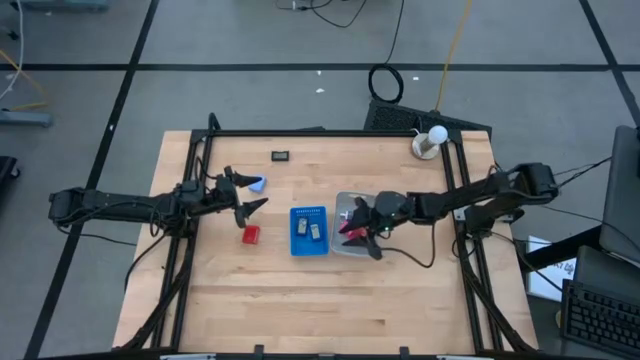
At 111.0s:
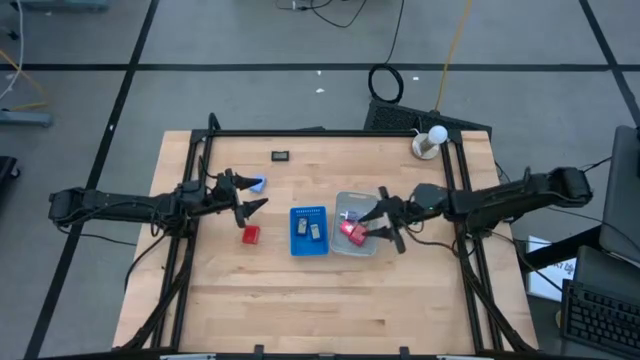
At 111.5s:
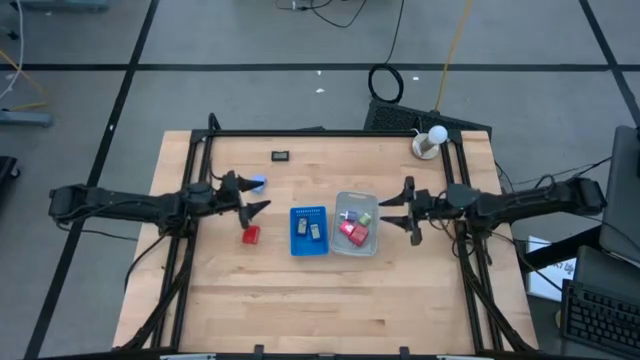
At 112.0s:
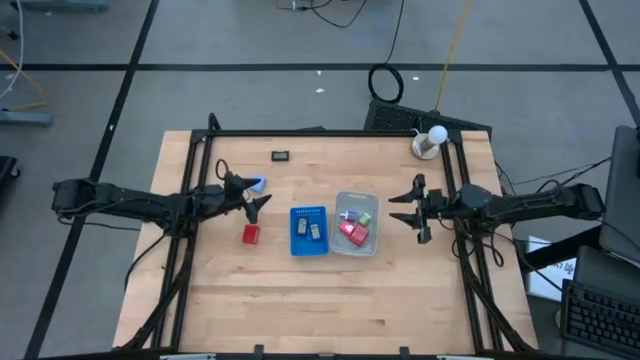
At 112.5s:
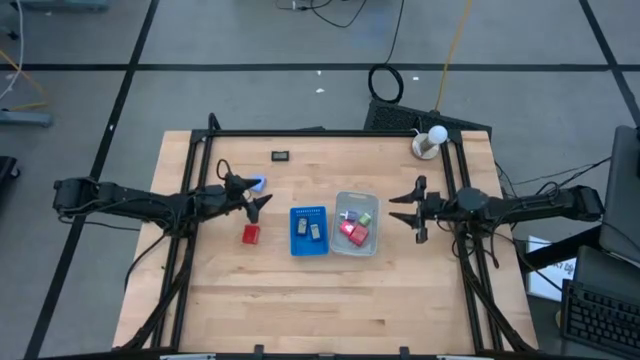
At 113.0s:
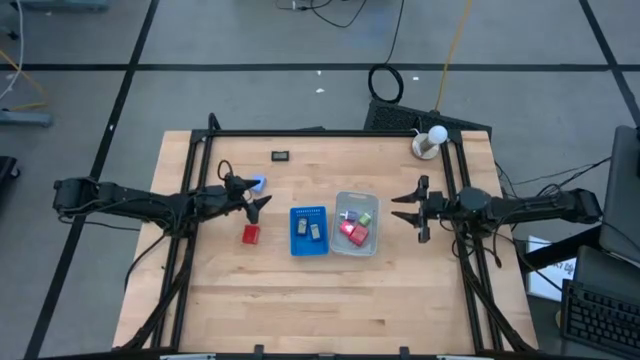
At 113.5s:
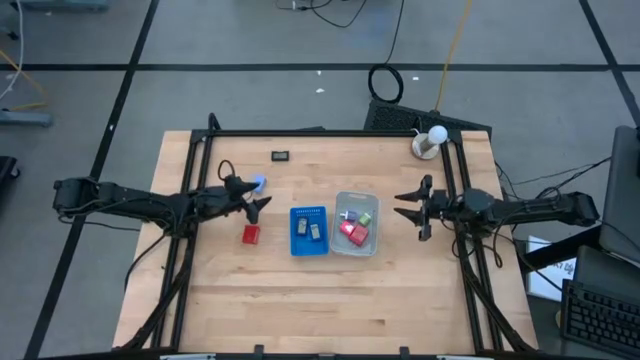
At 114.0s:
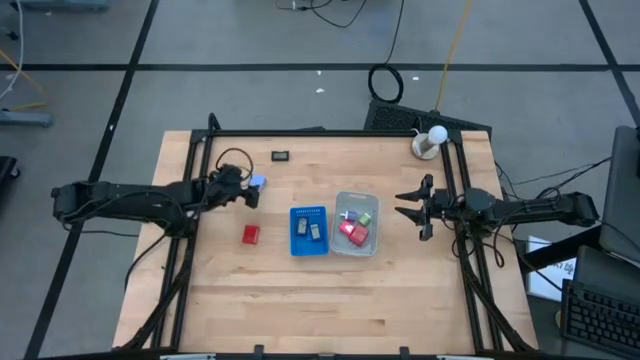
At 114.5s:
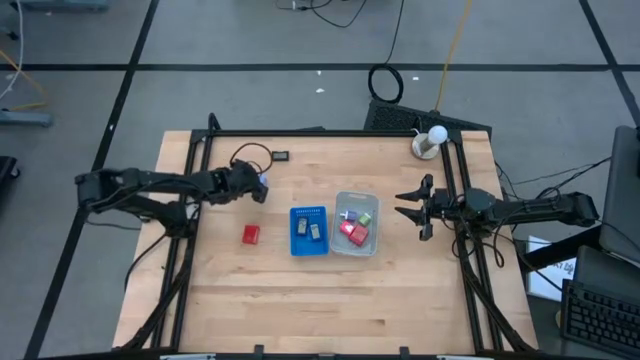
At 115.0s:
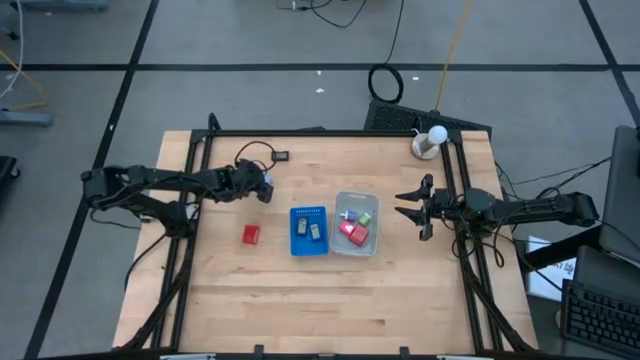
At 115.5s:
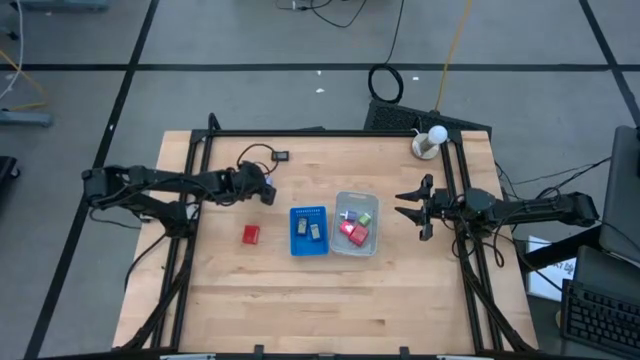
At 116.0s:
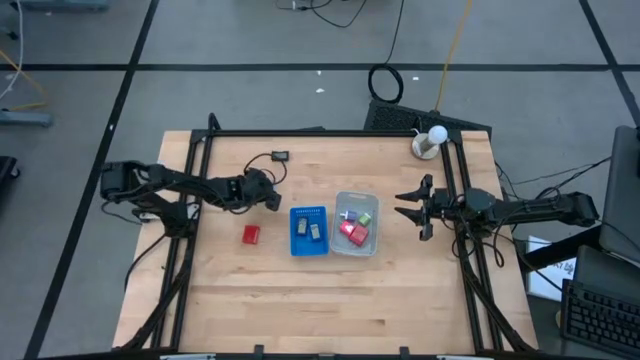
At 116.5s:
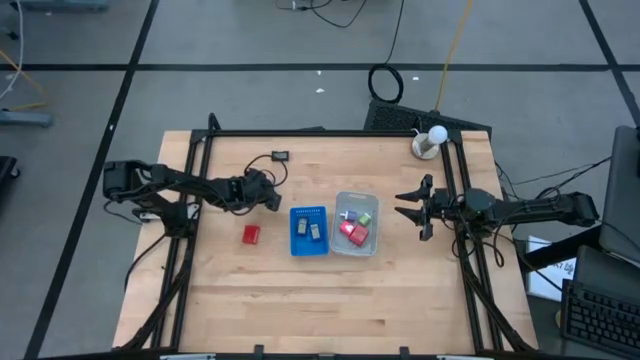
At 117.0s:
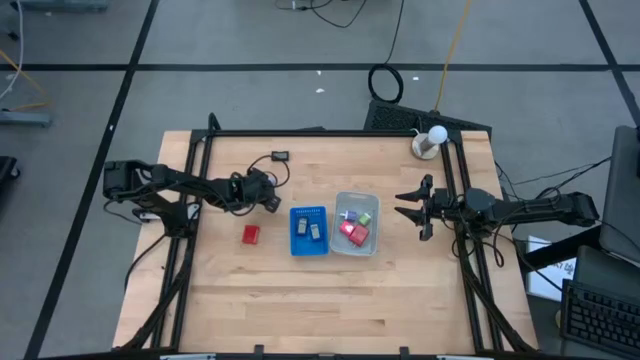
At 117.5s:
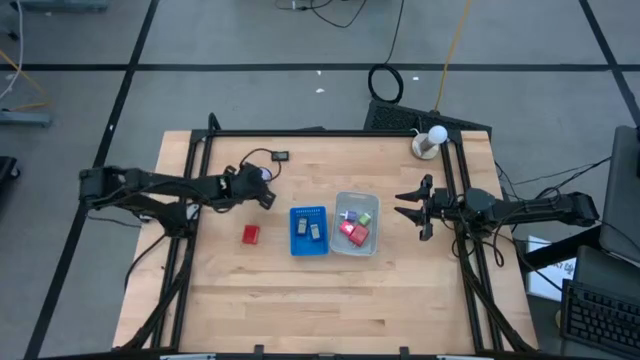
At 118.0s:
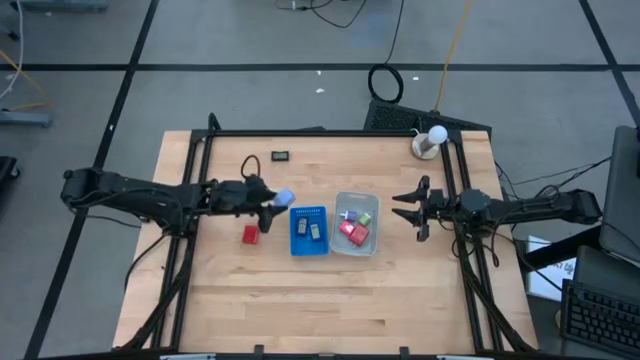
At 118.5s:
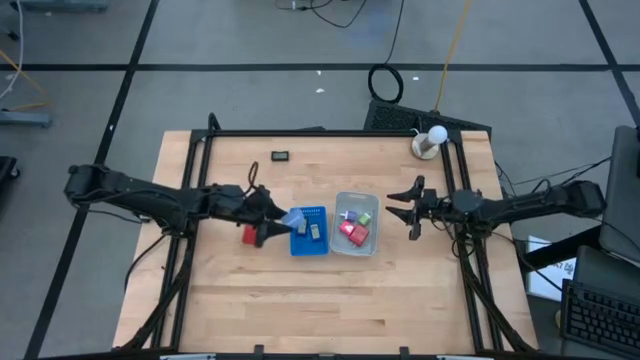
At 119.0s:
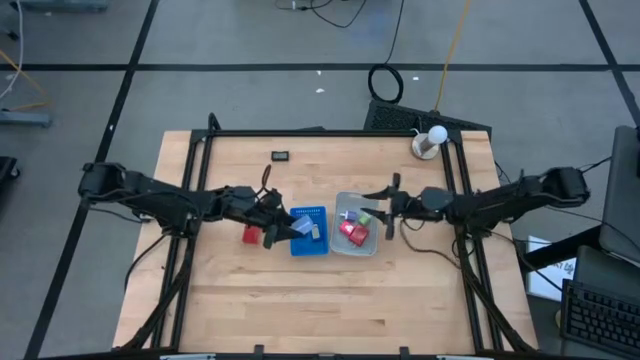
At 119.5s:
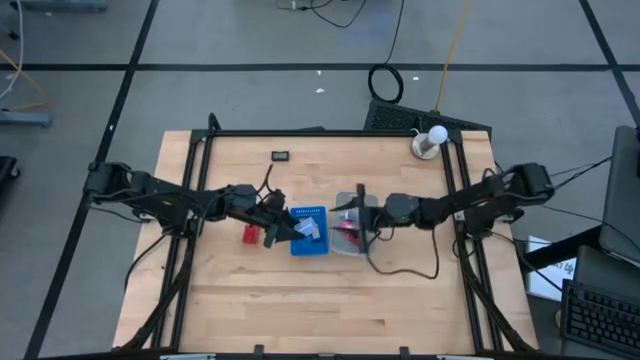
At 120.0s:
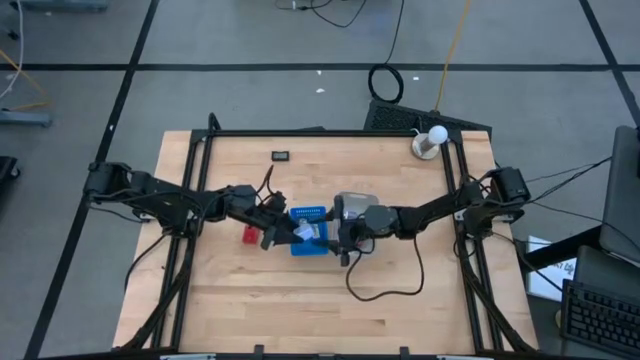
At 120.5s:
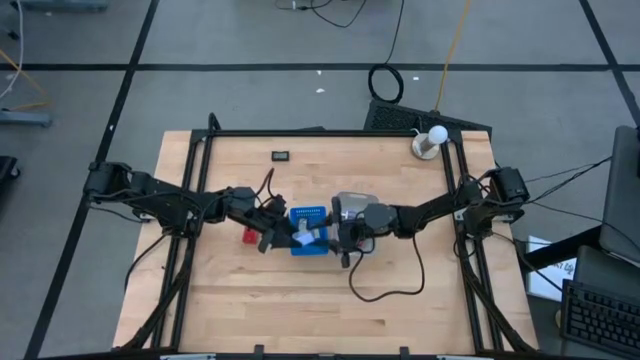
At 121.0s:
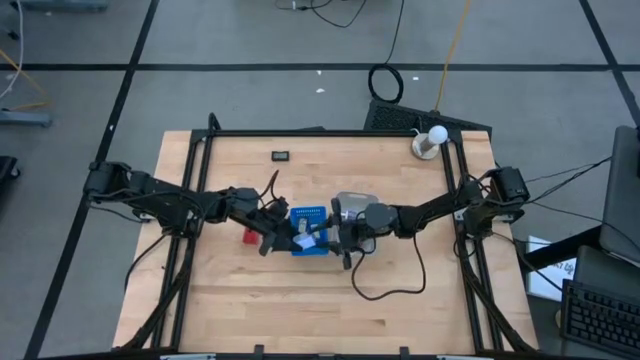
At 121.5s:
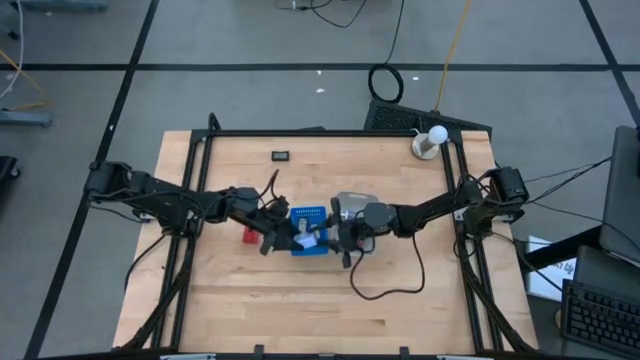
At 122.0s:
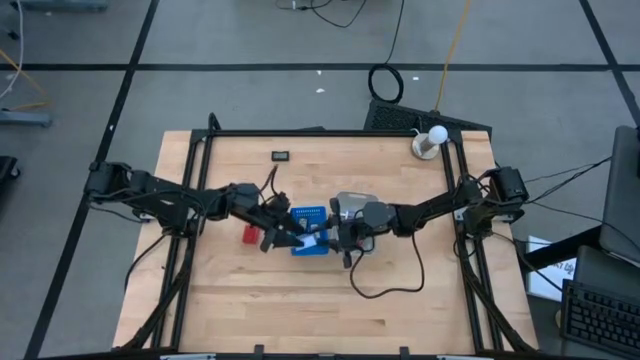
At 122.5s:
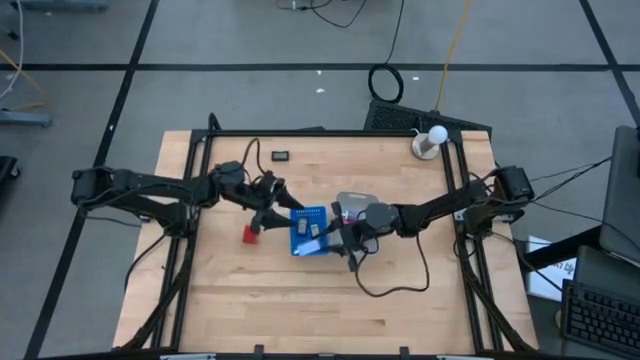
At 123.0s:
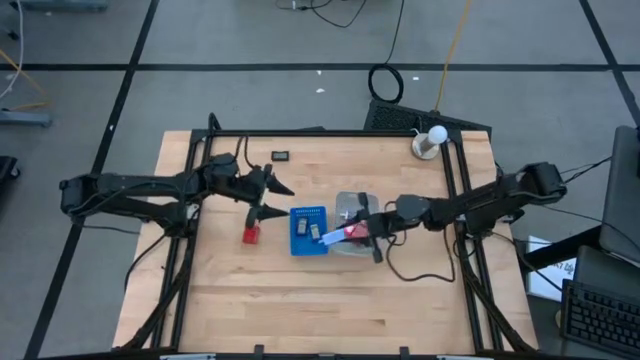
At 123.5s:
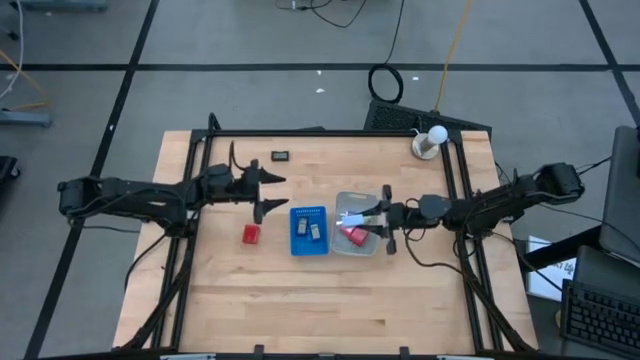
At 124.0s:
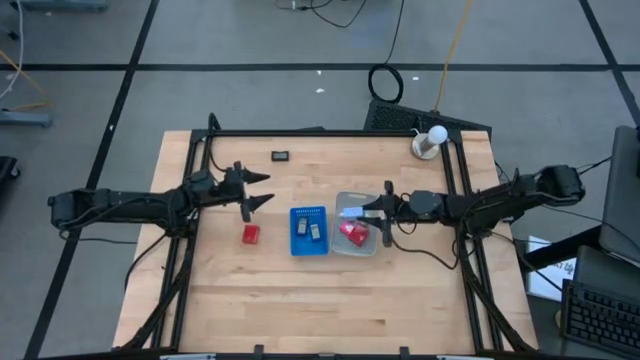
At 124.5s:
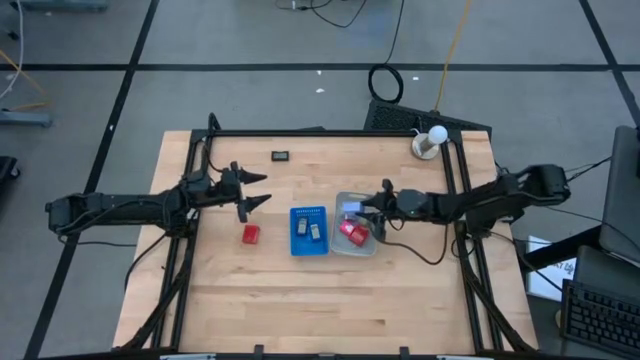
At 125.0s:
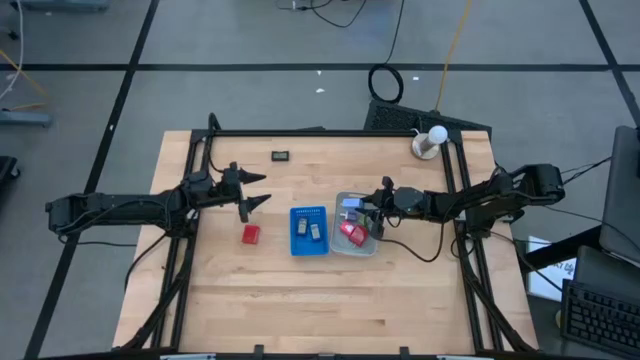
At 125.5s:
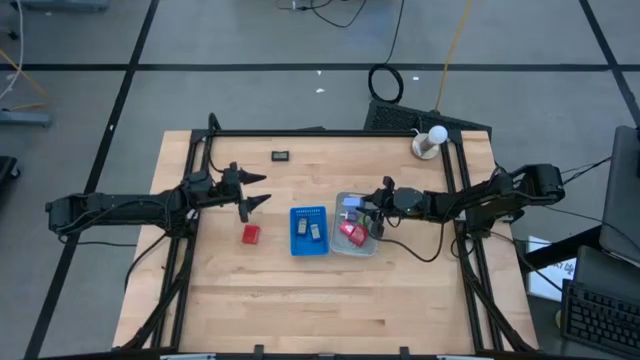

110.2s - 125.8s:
Task: Pick & Place Office items
Put the light blue charger adapter into the gray bin

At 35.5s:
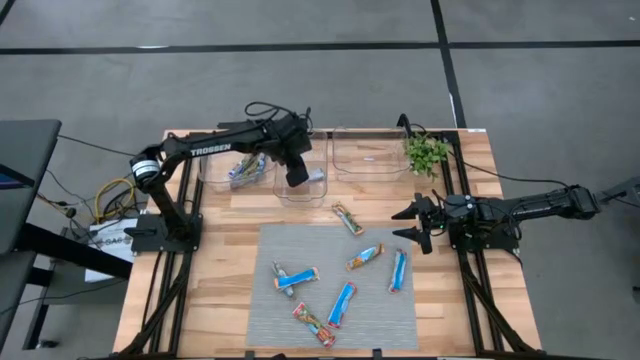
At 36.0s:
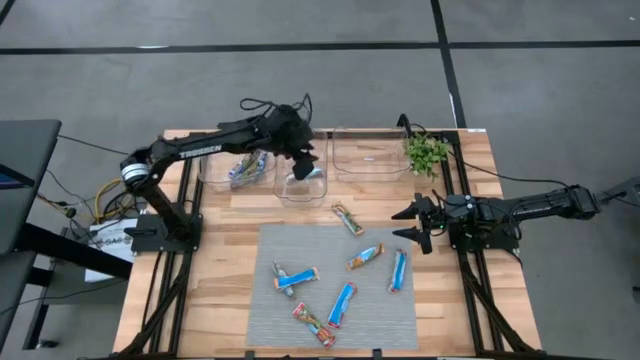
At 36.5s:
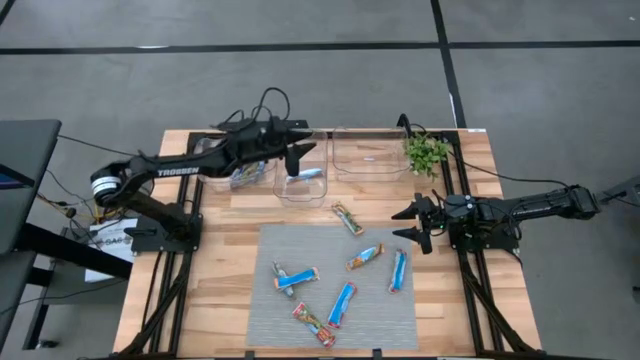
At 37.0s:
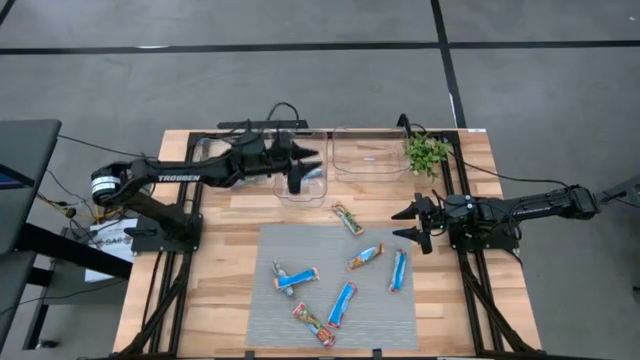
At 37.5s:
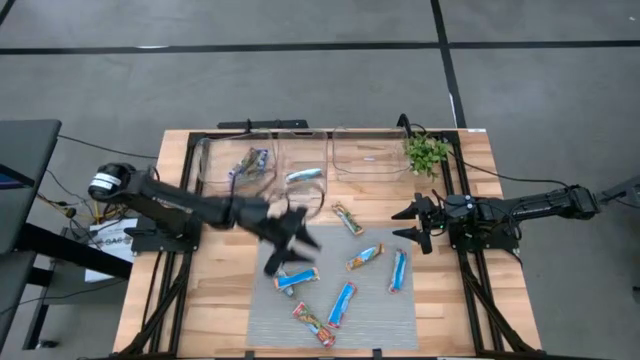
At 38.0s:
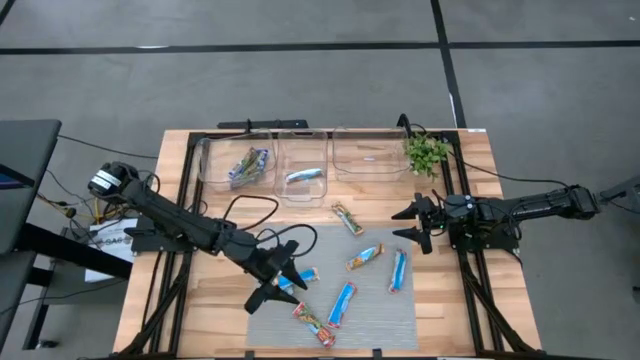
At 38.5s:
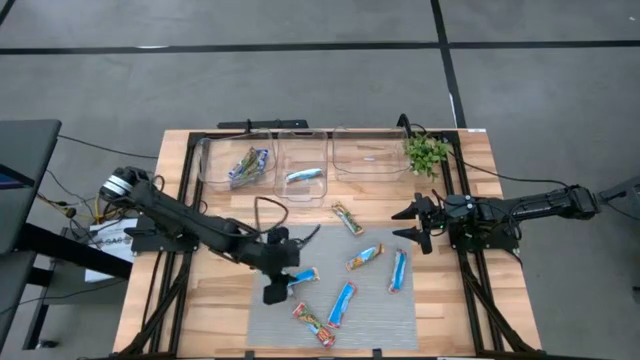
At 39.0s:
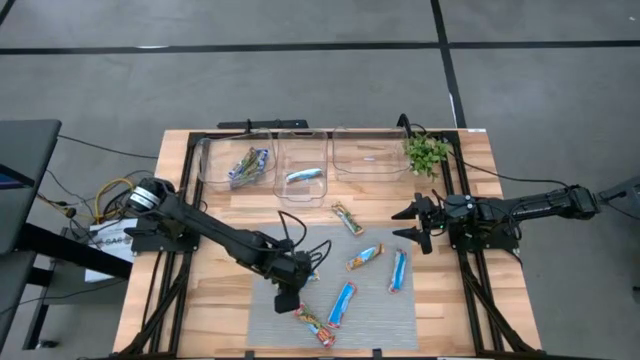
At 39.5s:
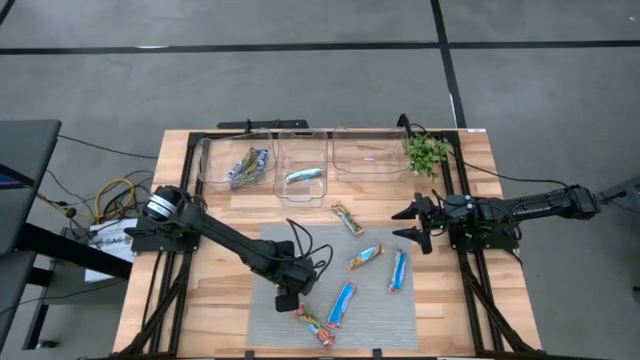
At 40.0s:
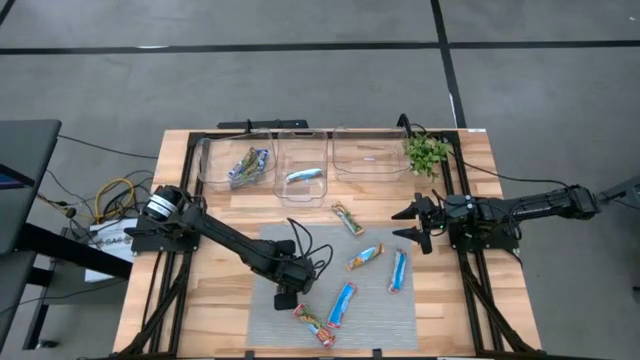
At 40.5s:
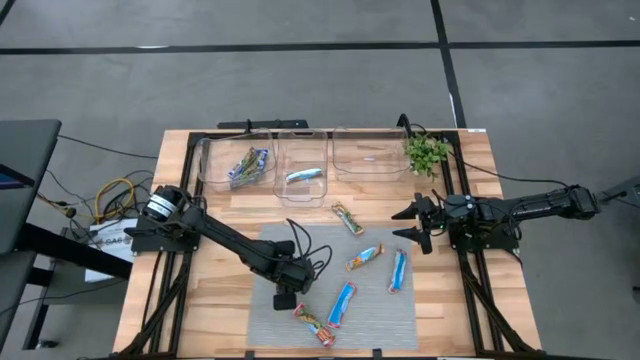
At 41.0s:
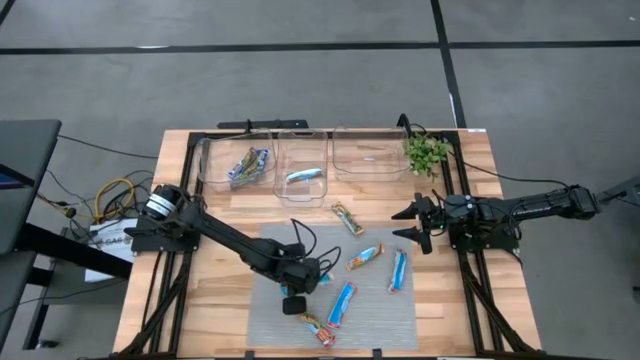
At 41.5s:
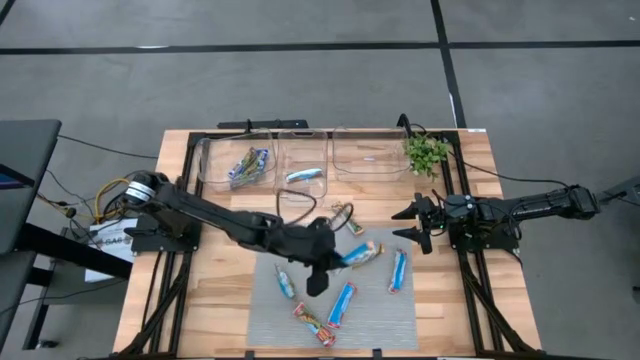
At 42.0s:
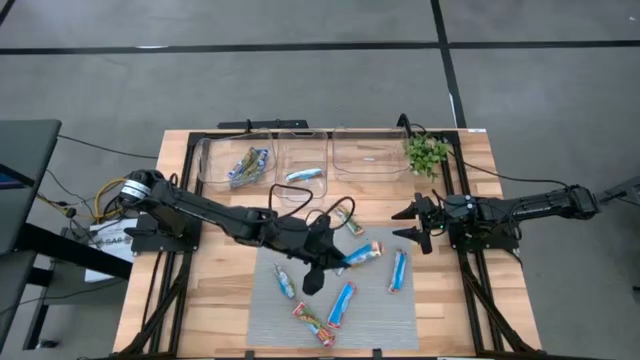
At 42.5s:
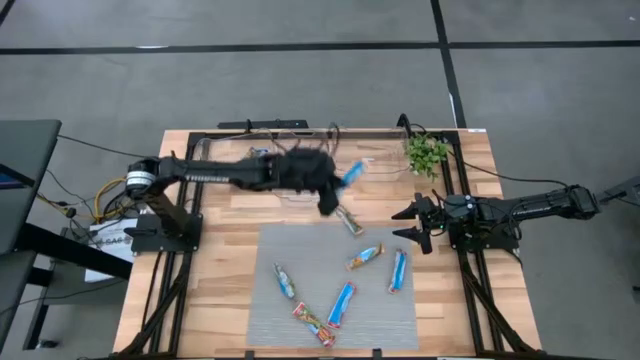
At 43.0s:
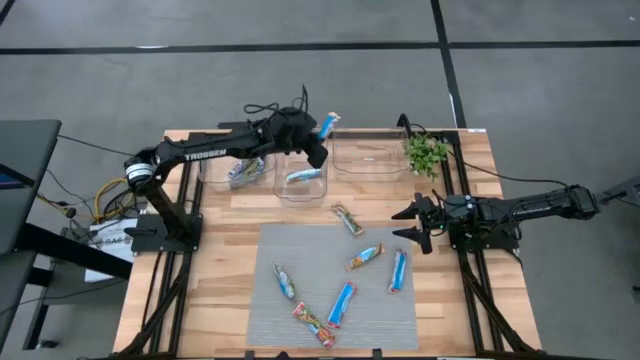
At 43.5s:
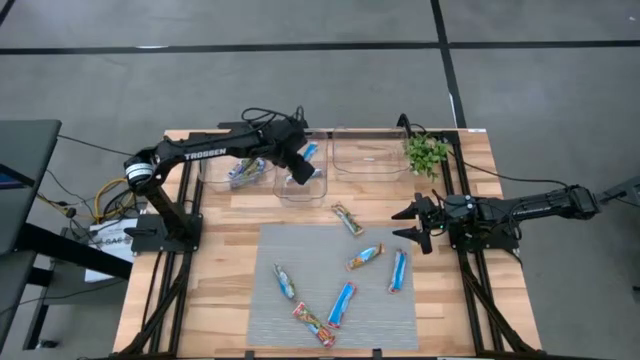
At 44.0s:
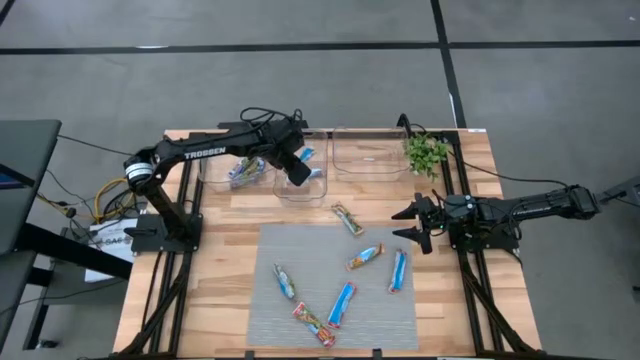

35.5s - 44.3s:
Task: Pick and place Granola Bars by type
Put the yellow granola bar into the center transparent bin
